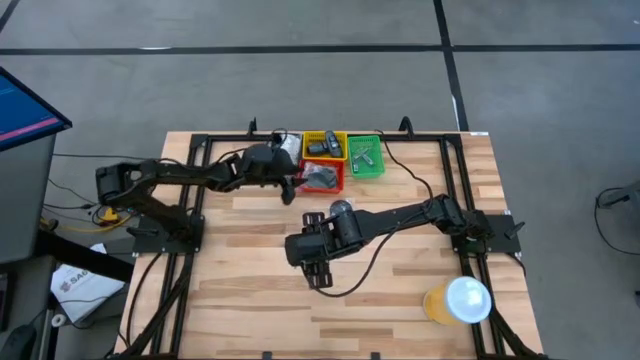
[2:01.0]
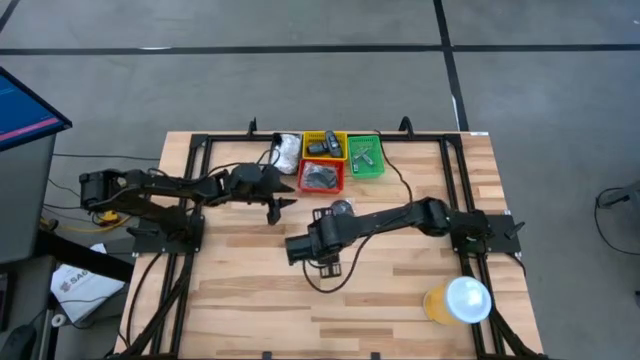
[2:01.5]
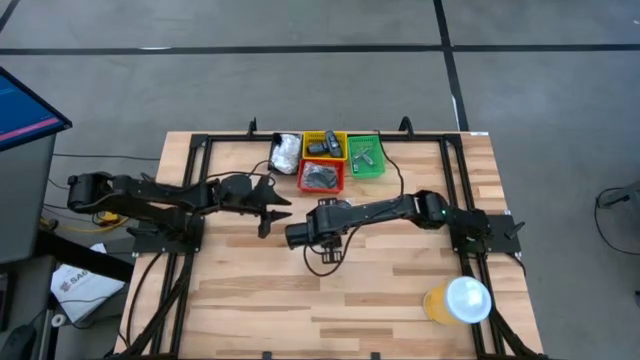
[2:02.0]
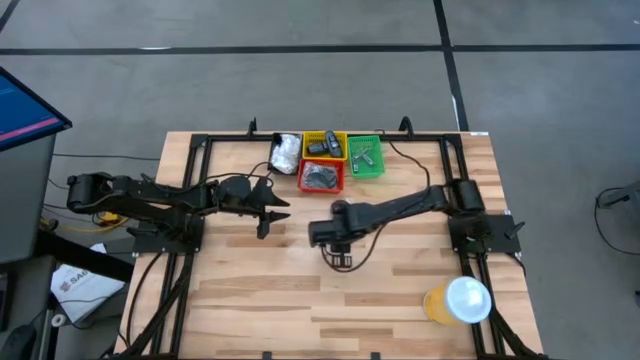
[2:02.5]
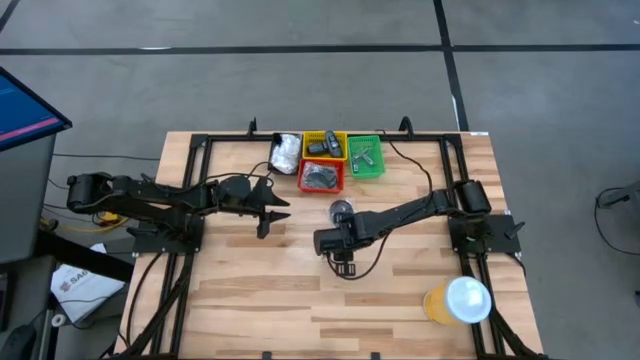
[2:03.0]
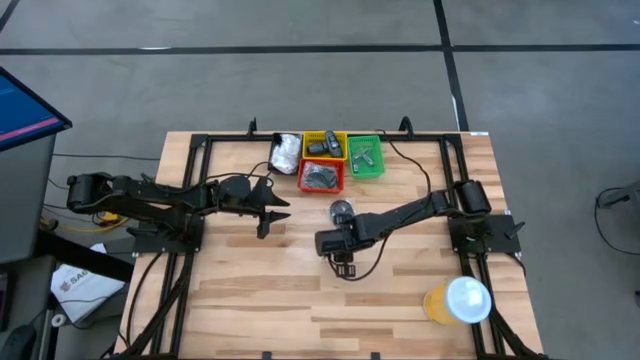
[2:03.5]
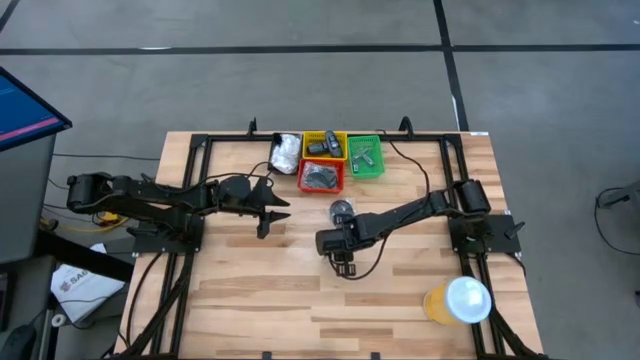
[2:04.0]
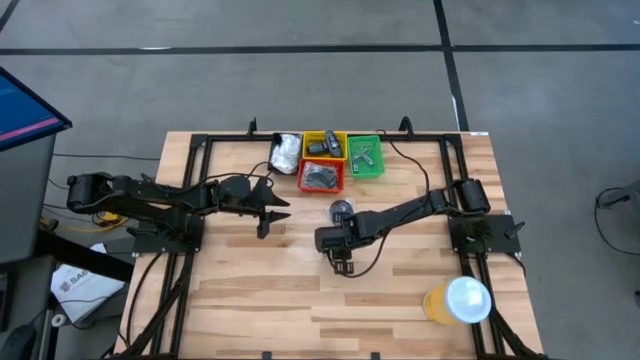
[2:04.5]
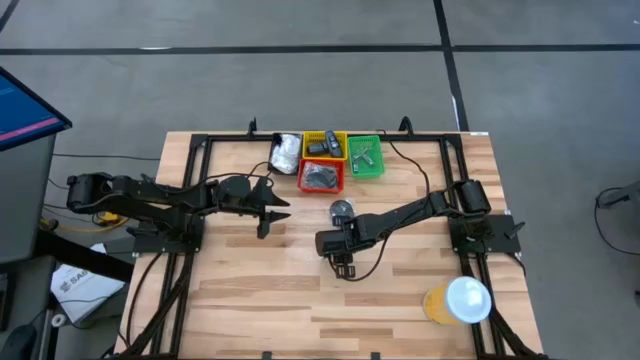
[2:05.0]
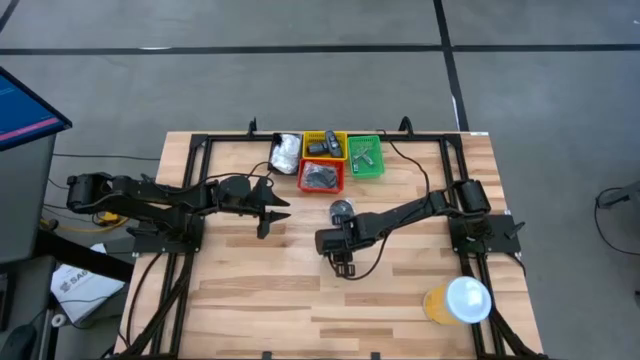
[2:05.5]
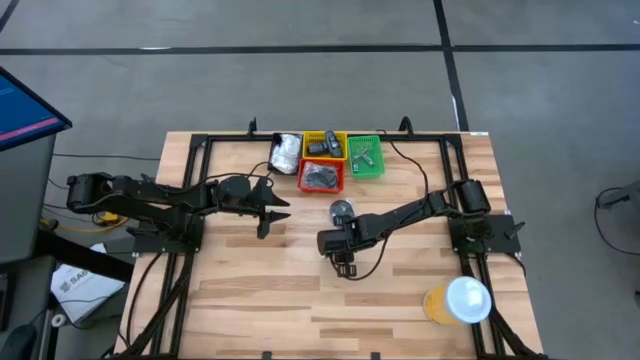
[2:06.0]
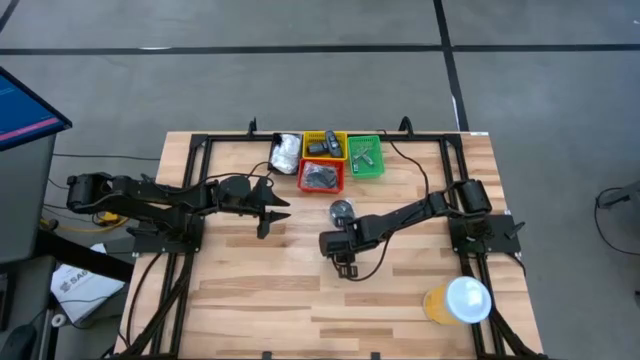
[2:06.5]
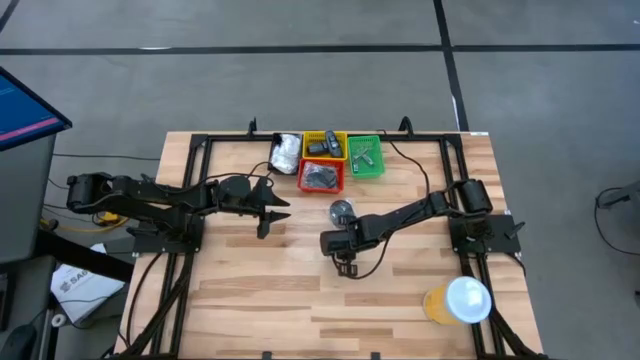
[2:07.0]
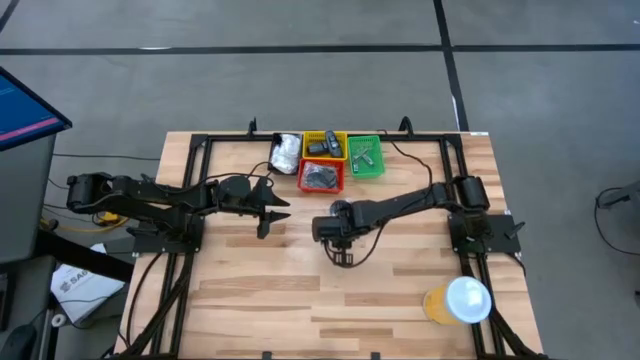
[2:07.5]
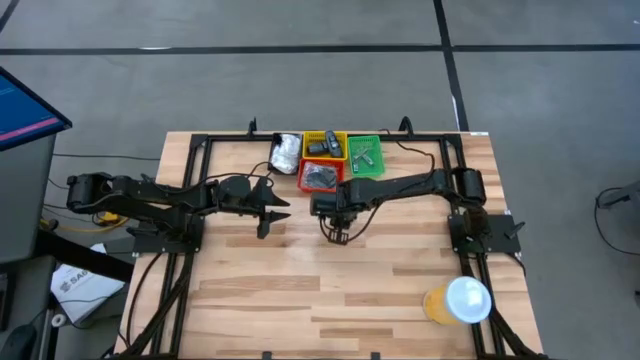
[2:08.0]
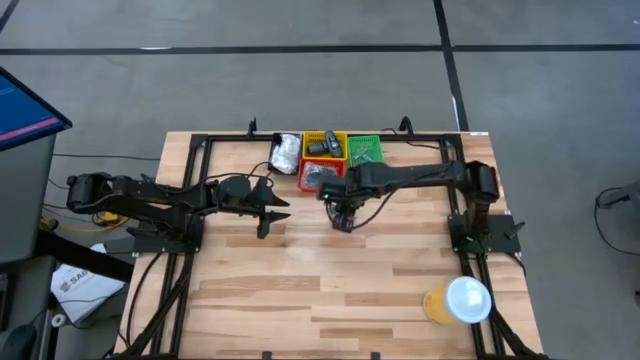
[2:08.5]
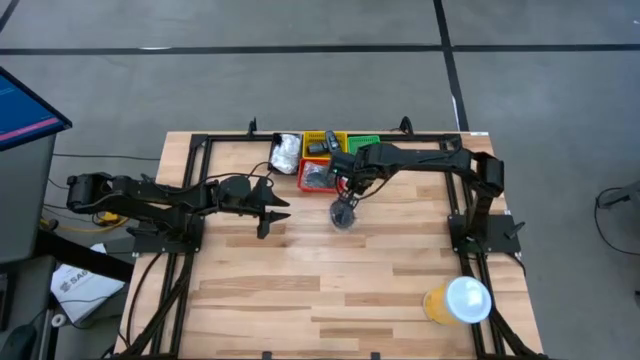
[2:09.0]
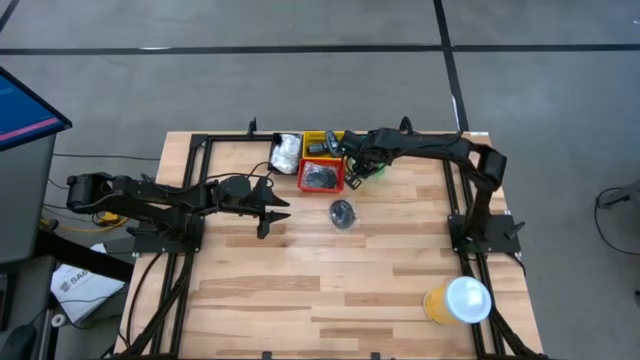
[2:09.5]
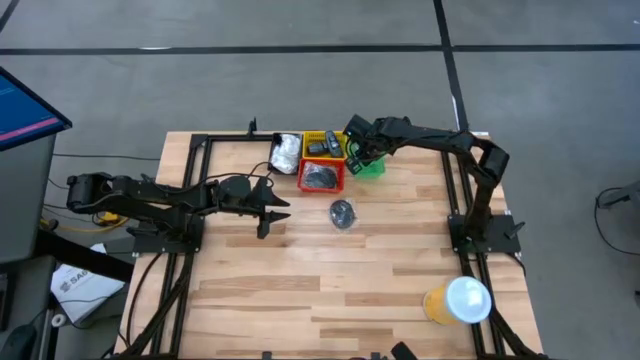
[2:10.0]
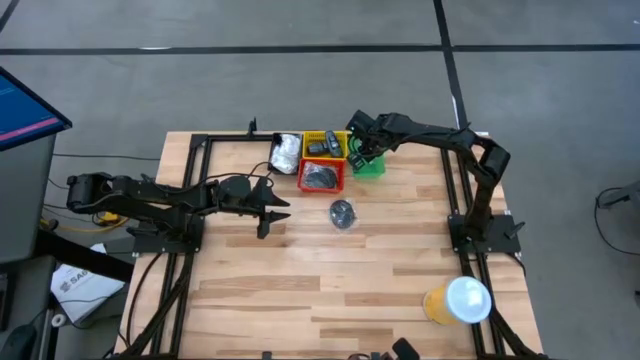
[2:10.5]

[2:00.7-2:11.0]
Task: Pick & Place Travel size toiletries
Put the silver nail cutter into the green bin

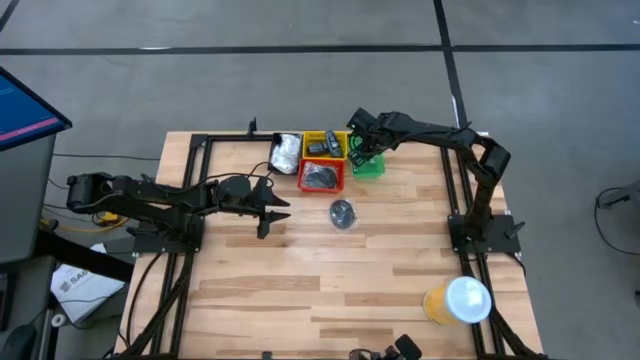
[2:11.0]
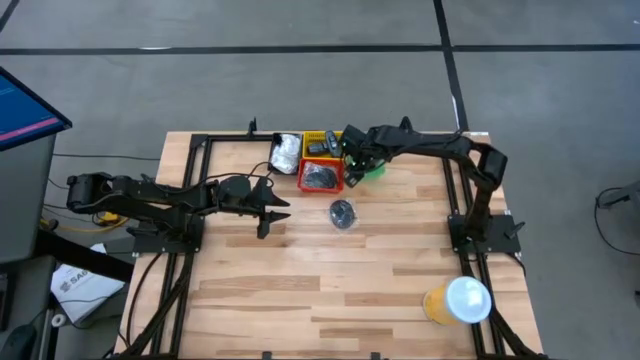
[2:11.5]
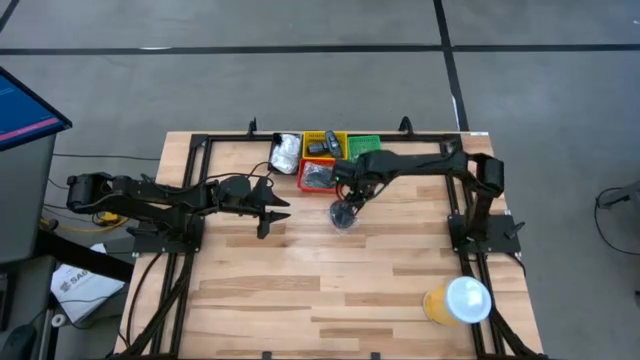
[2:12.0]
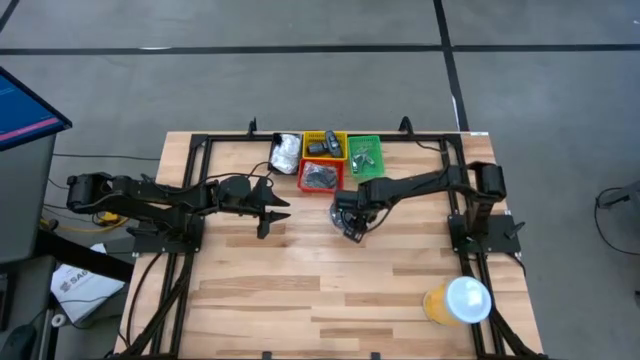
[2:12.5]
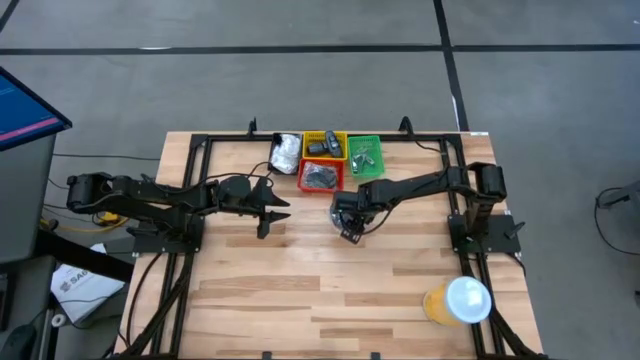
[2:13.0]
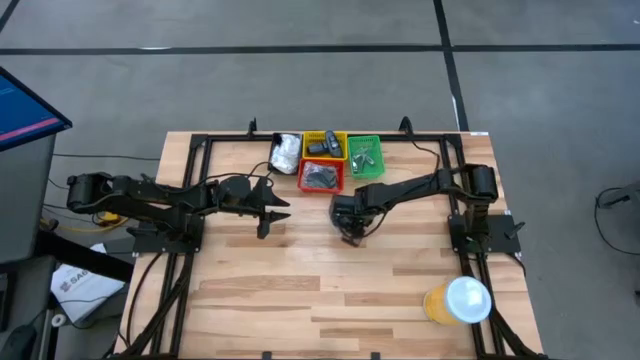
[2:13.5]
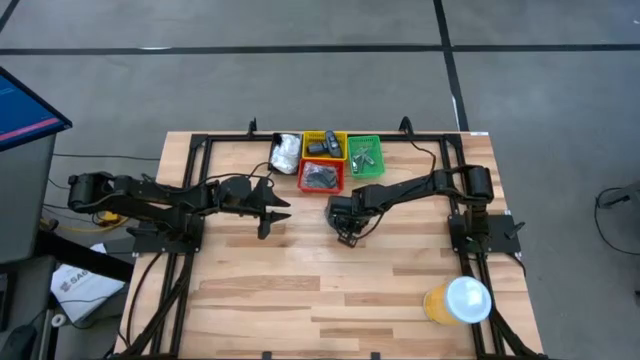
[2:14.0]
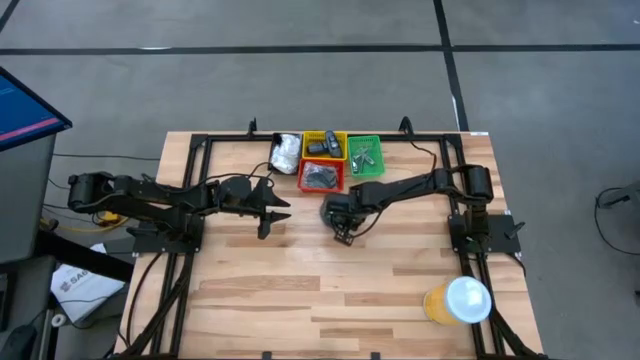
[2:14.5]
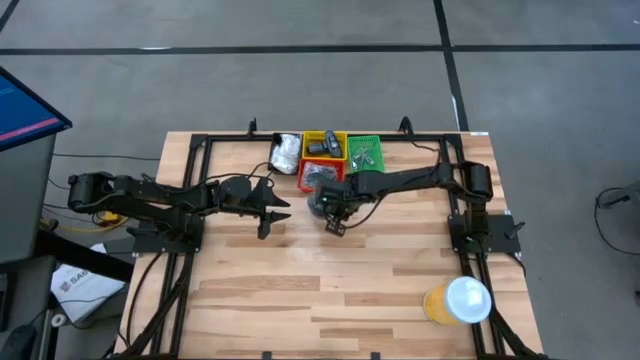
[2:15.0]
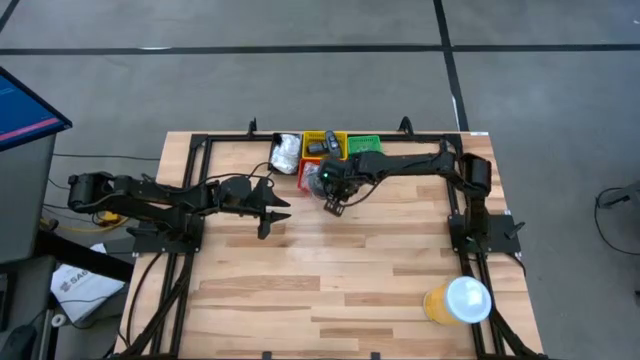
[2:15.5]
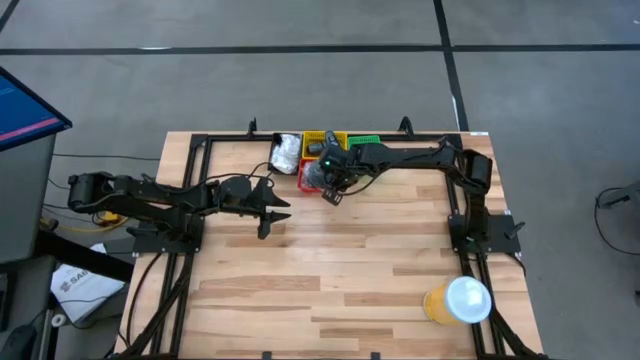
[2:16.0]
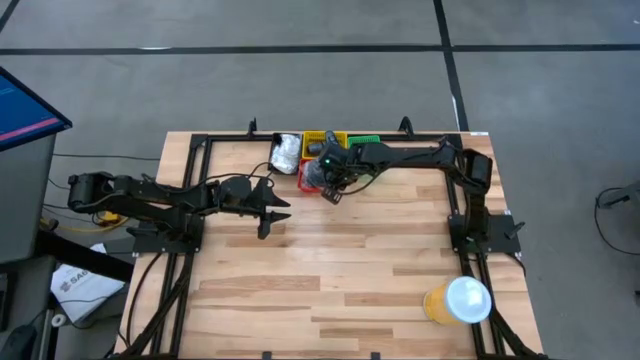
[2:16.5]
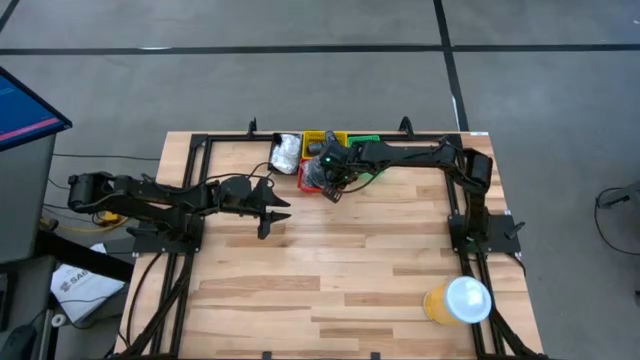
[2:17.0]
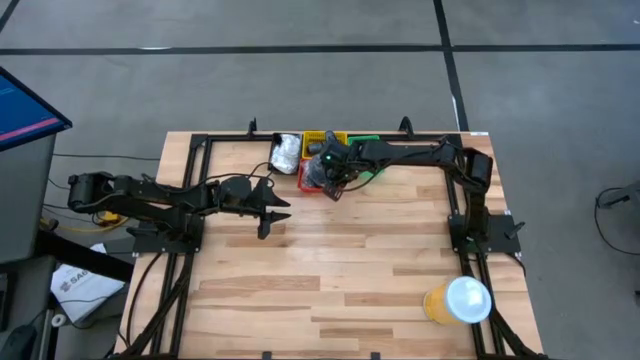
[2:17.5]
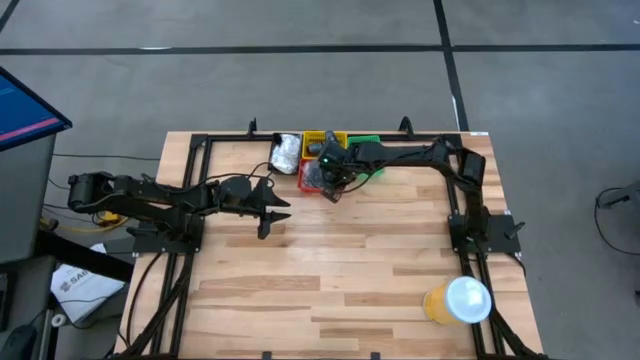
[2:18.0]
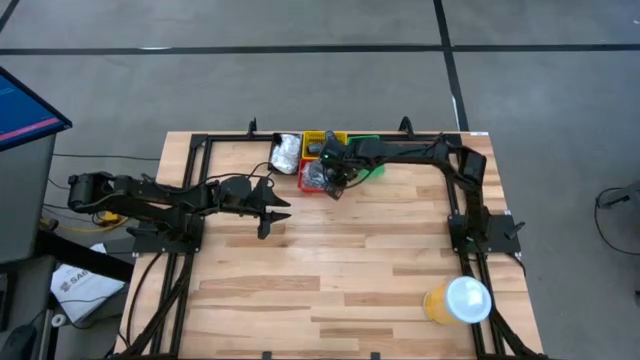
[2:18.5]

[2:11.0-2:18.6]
Put the black hairbrush into the red bin

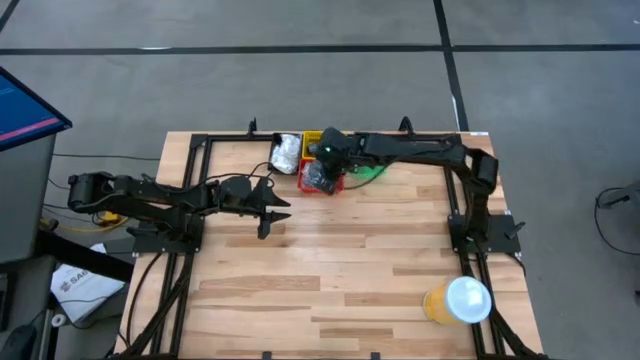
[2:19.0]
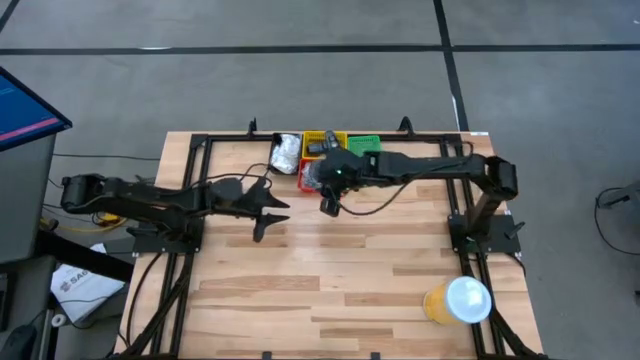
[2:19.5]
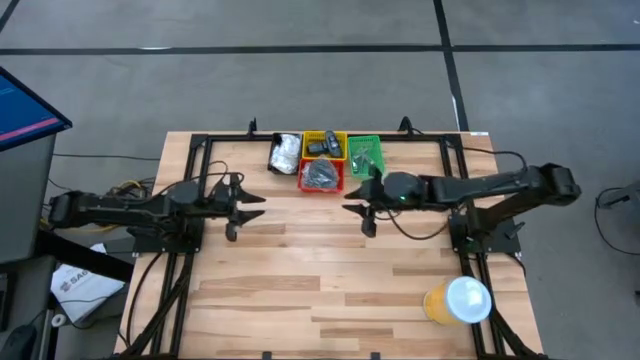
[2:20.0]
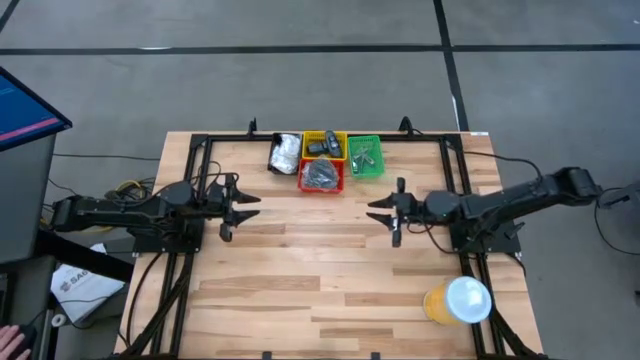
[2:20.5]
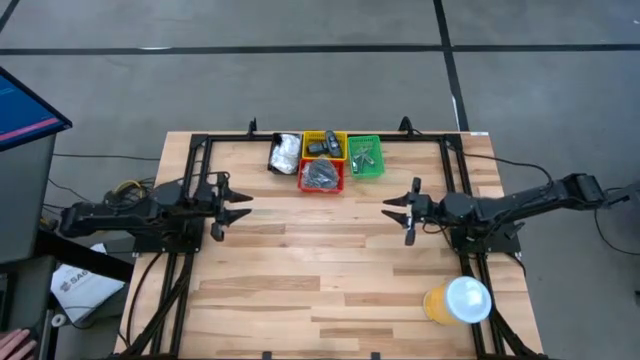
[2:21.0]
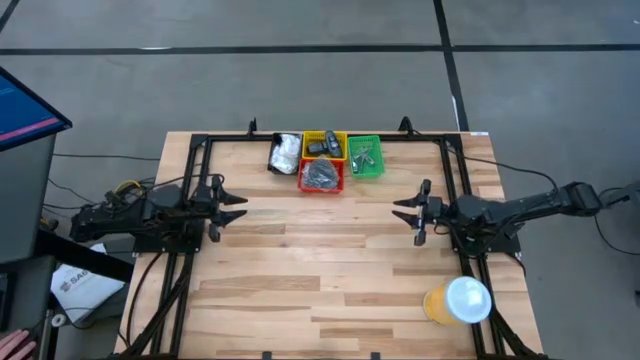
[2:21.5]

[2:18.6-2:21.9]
Return to Home Position

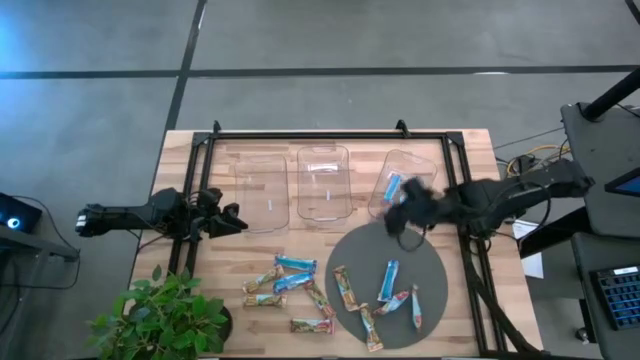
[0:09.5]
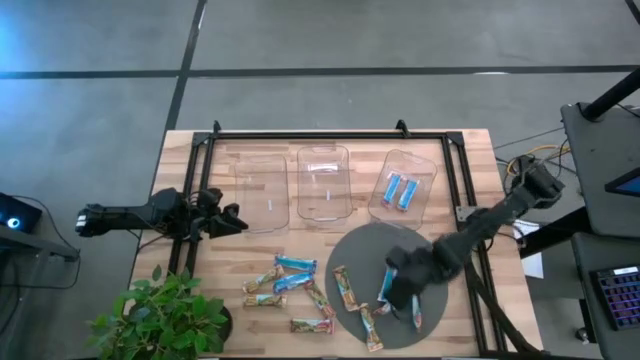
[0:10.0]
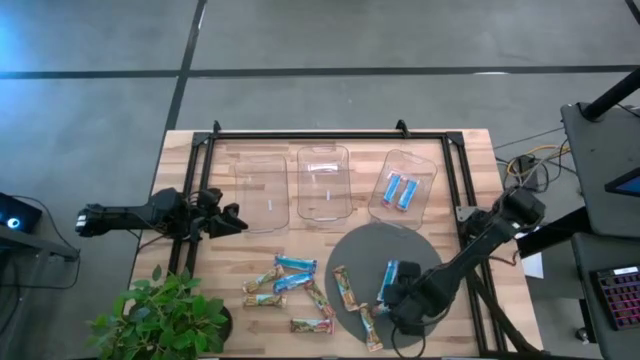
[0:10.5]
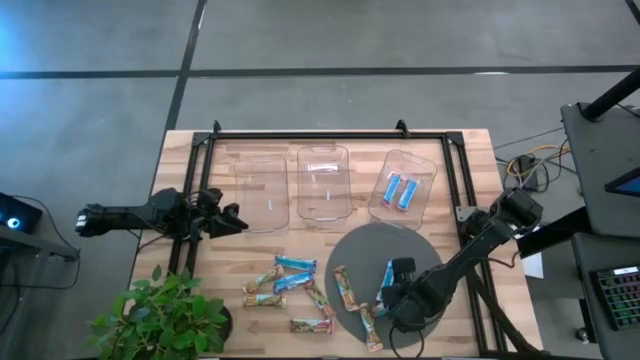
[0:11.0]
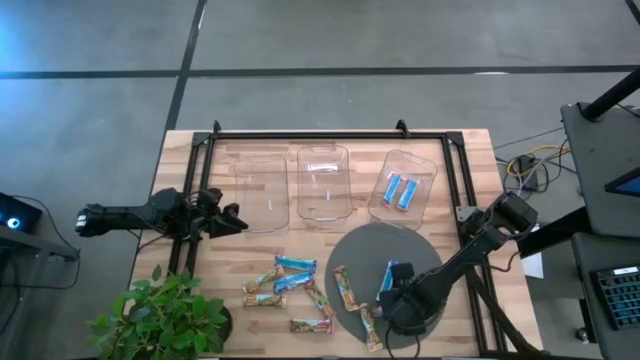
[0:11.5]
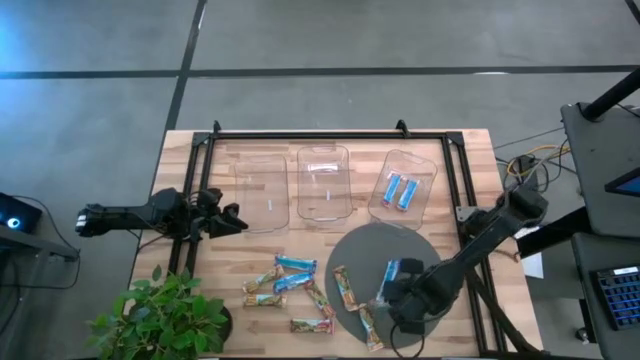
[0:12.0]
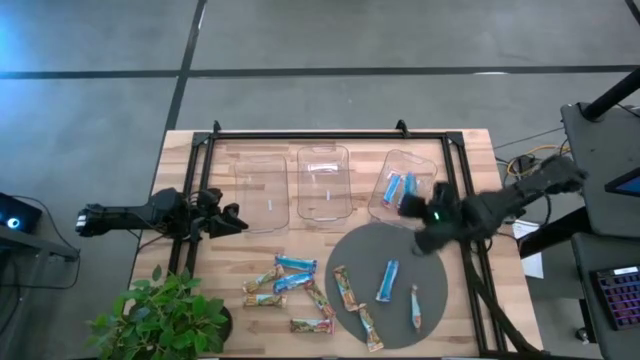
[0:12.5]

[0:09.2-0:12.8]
Task: Pick and place Granola Bars by type
Put the red granola bar into the right transparent bin
